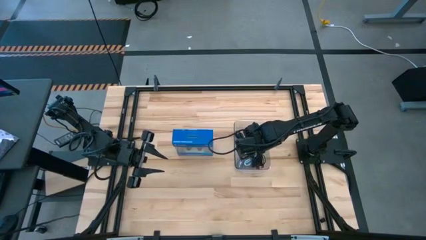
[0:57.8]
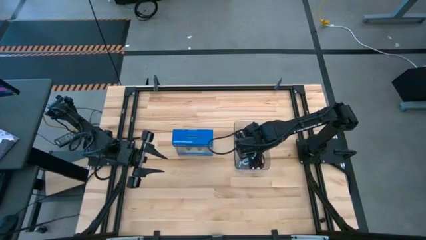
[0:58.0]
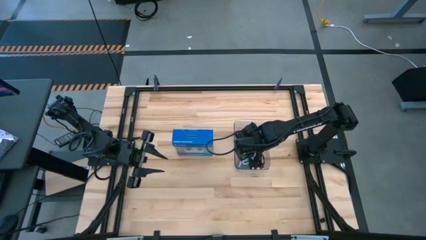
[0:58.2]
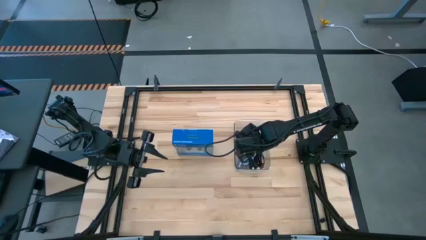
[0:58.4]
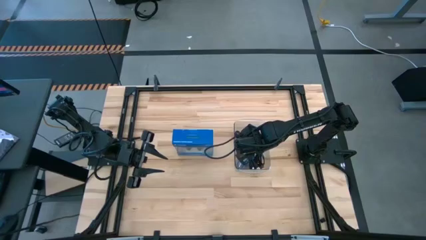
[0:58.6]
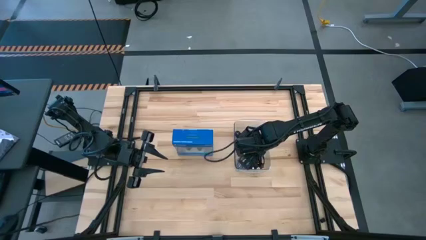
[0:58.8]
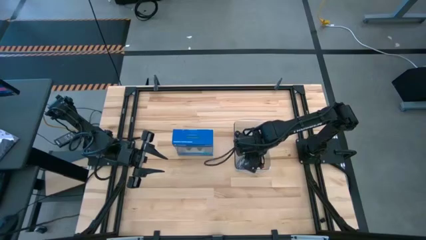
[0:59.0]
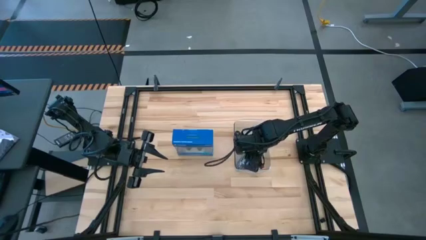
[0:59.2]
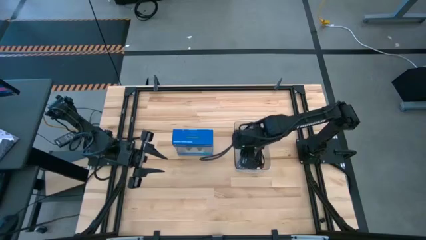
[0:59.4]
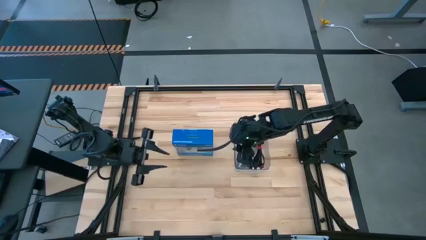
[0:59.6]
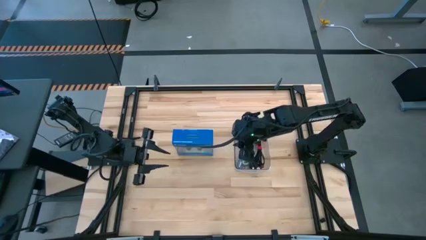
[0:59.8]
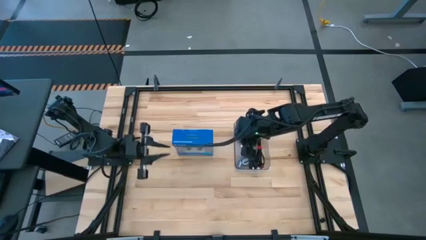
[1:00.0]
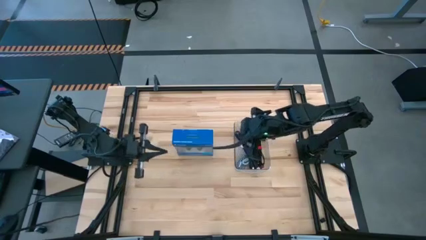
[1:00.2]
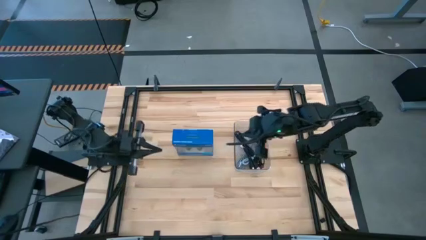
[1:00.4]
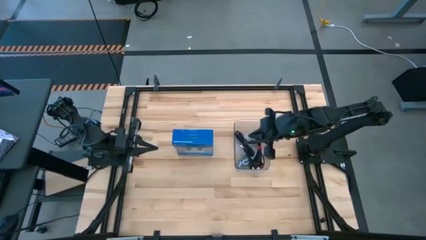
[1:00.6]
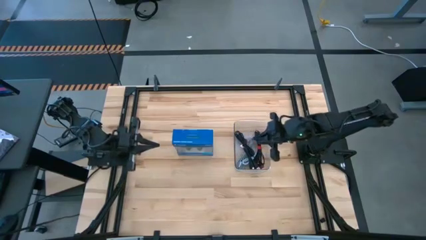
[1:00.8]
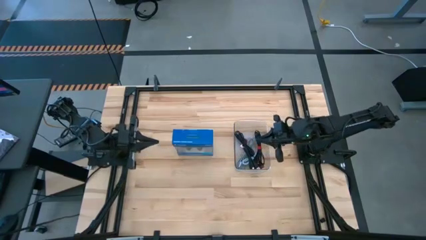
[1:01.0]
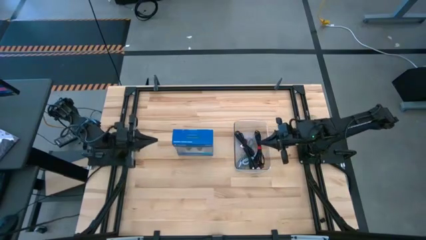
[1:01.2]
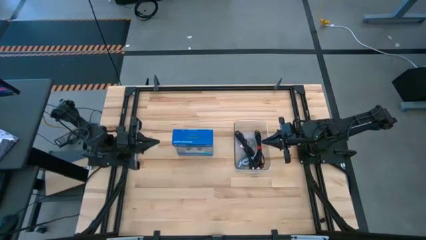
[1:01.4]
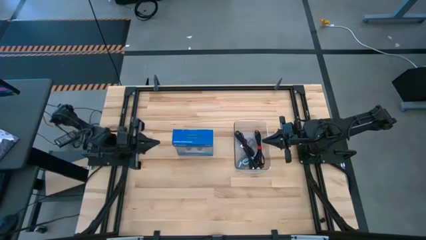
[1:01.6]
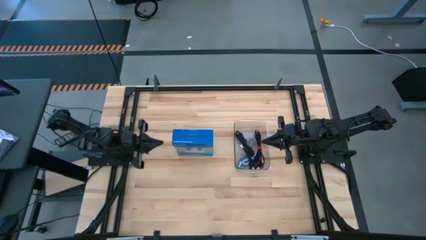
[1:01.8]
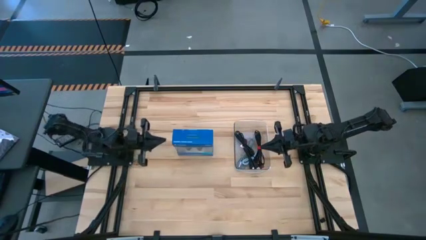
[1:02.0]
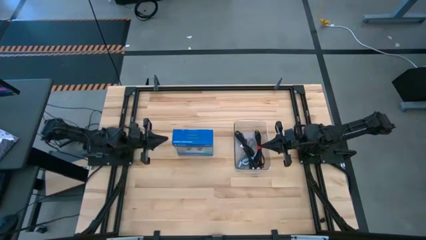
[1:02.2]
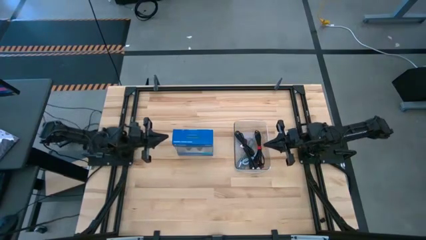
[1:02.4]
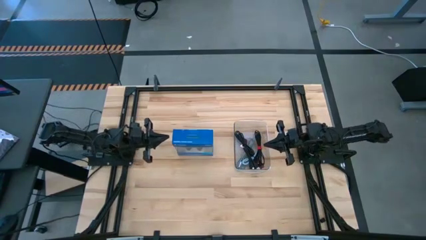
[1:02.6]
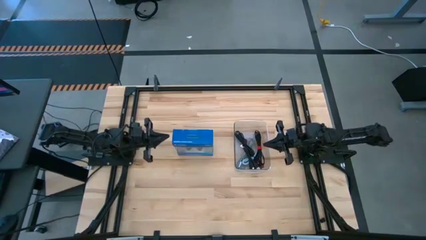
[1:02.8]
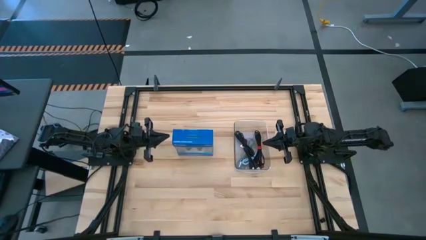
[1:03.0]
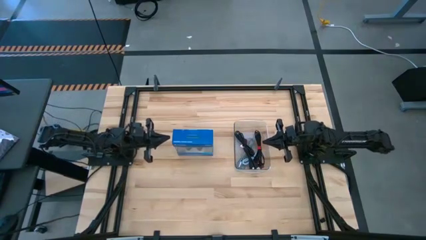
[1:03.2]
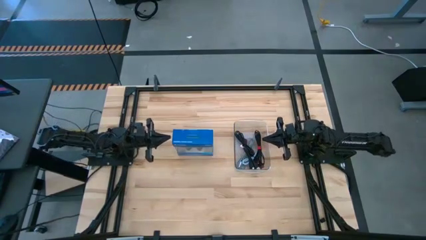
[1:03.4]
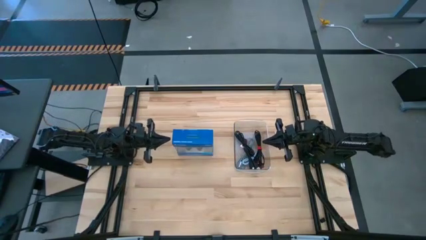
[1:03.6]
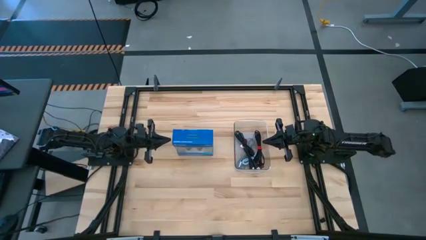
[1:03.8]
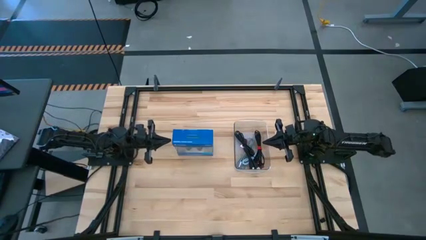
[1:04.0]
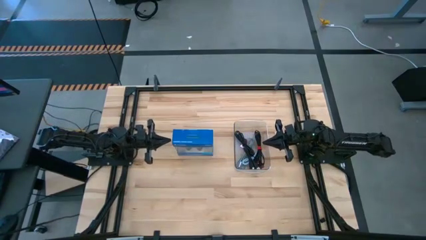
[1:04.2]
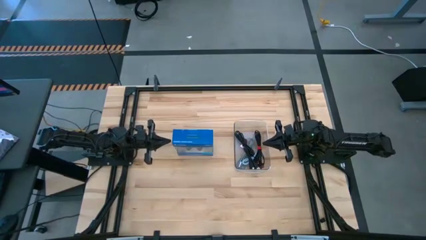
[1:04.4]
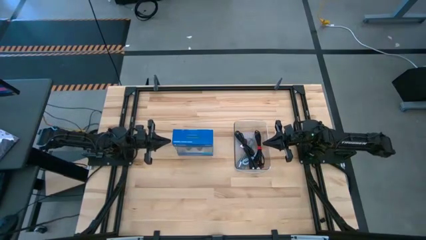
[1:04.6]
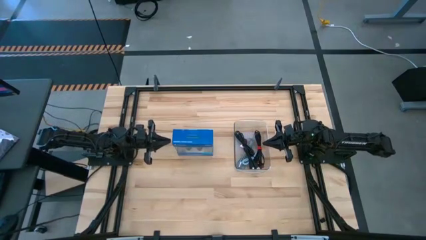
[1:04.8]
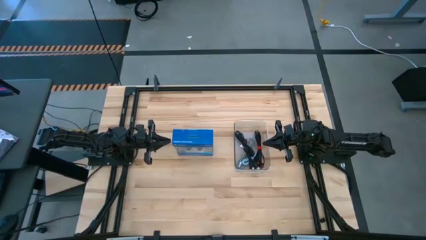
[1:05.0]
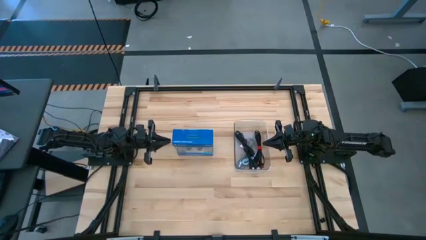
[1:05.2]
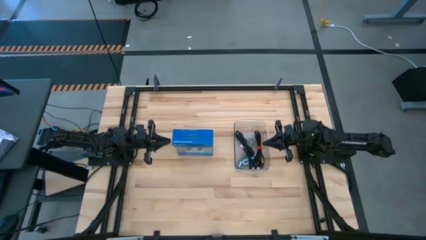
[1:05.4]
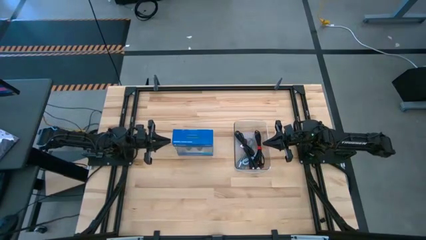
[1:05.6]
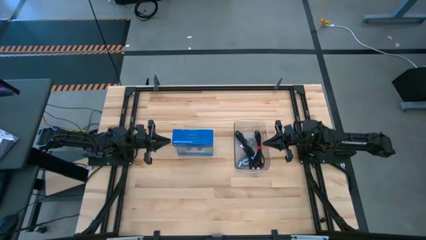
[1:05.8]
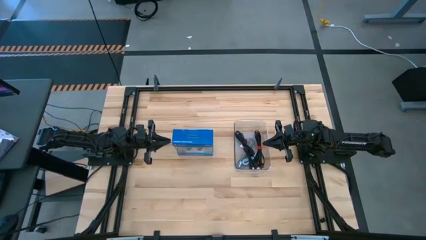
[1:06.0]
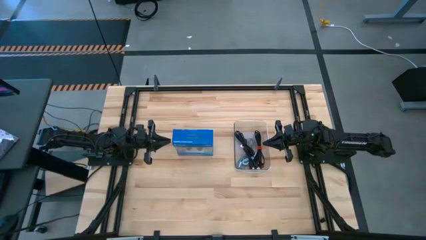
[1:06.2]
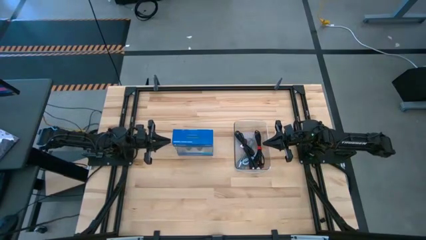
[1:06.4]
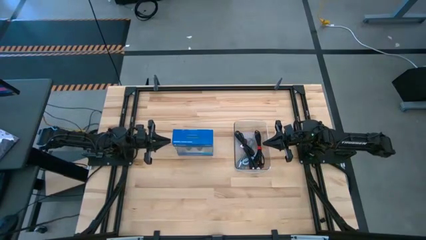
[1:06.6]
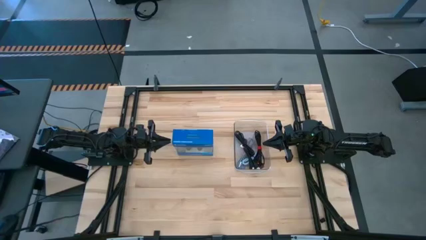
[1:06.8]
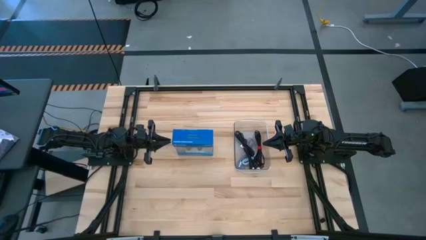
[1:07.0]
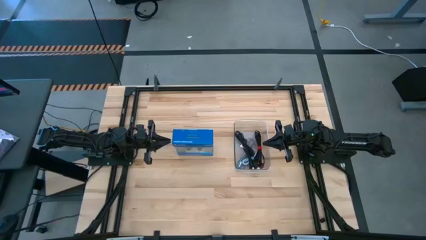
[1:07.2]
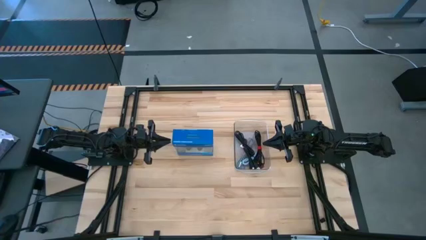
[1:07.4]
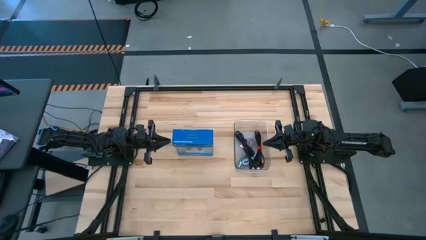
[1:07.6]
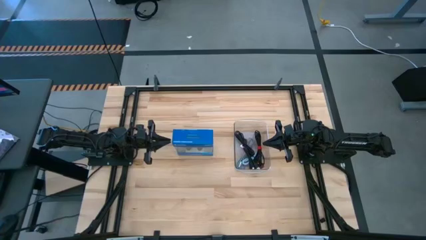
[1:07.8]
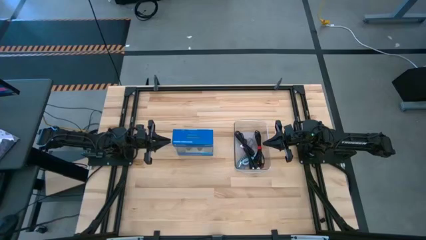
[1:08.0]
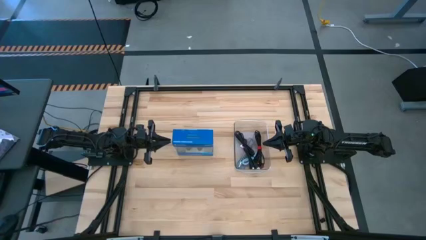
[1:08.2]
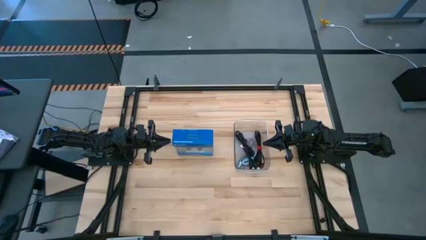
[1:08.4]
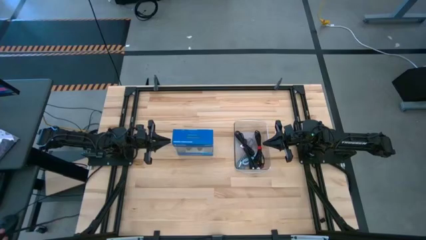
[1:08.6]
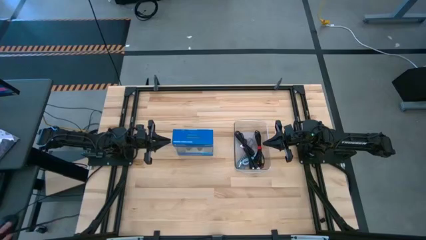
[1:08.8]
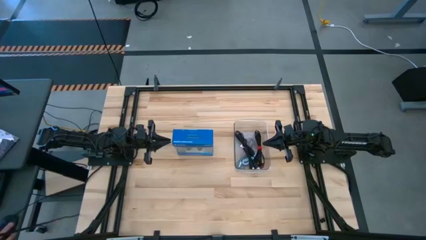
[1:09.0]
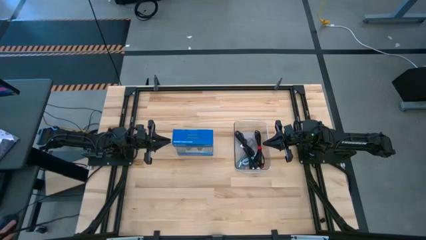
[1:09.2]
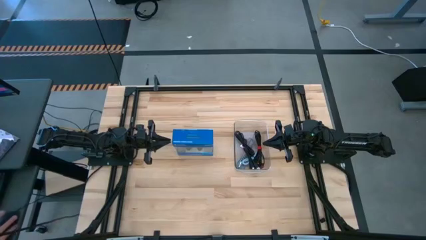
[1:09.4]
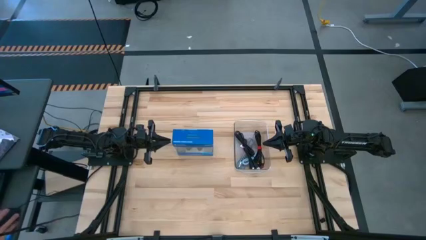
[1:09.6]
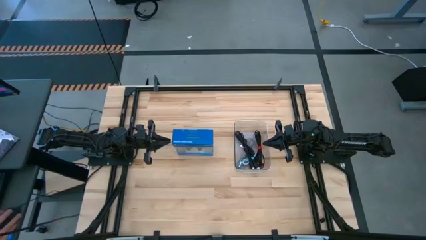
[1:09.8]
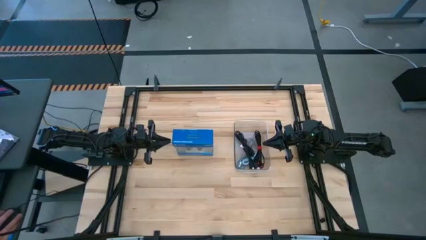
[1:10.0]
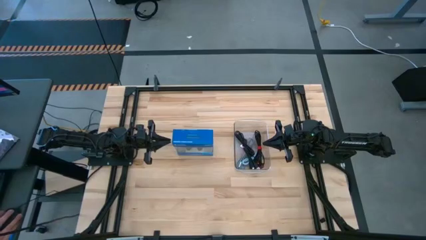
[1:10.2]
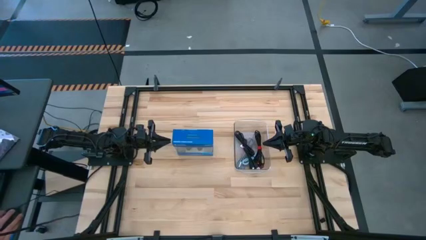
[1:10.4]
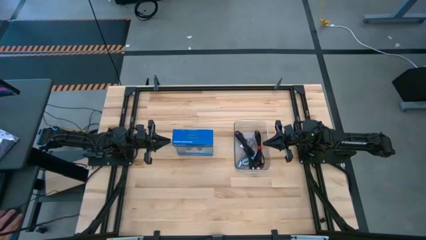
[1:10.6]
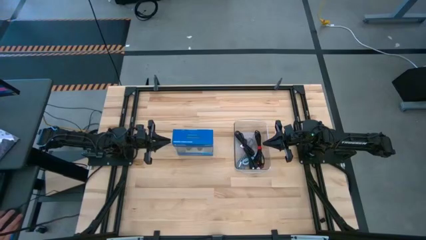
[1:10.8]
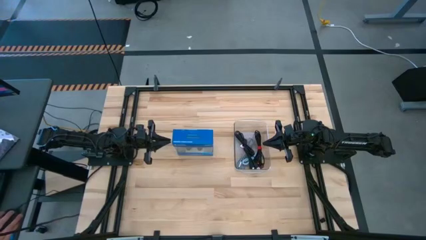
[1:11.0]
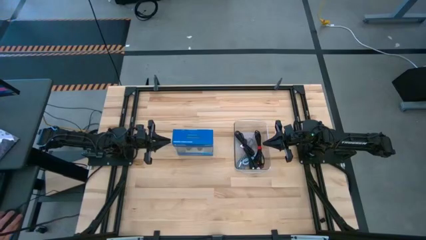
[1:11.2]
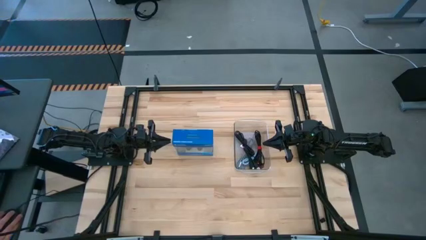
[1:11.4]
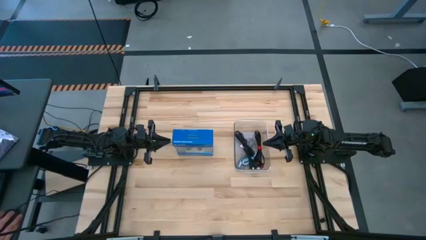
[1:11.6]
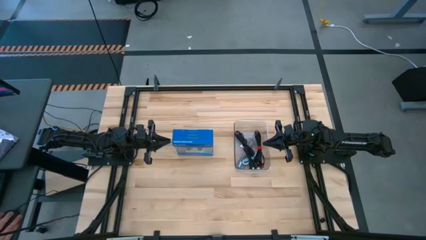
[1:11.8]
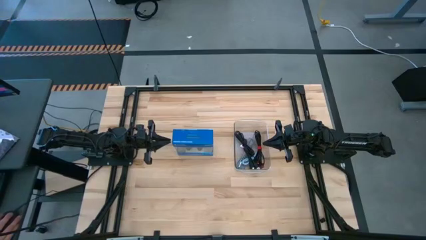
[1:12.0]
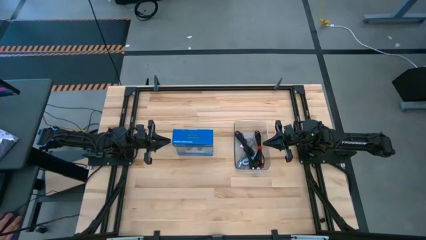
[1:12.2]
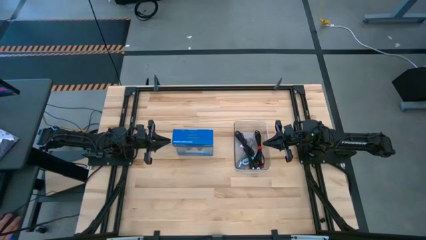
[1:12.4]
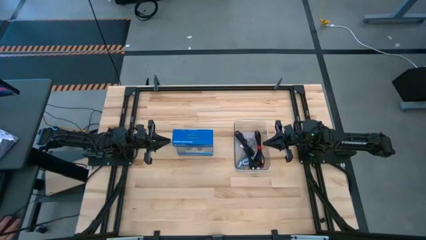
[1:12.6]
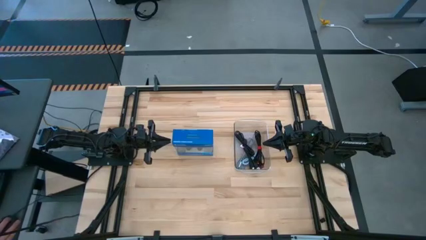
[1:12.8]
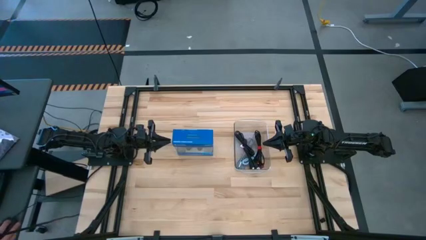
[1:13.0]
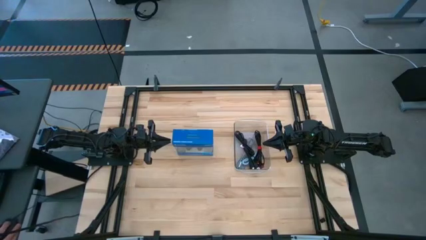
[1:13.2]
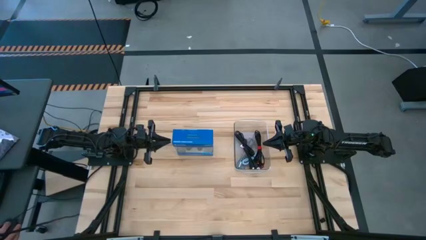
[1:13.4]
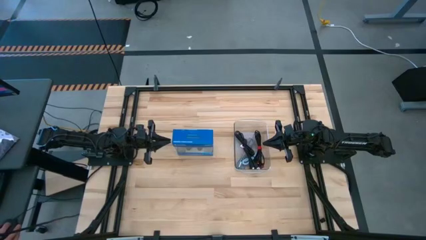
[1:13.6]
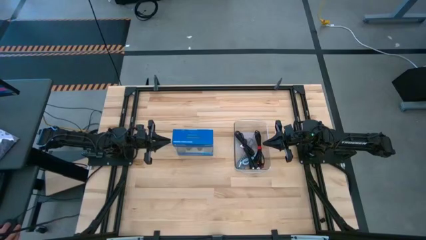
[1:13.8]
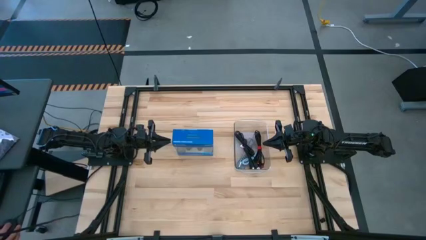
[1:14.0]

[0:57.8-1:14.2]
Task: Pick and place USB-C Cables
Return to Home Position

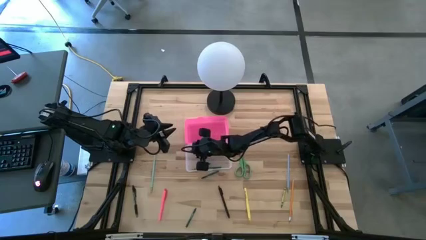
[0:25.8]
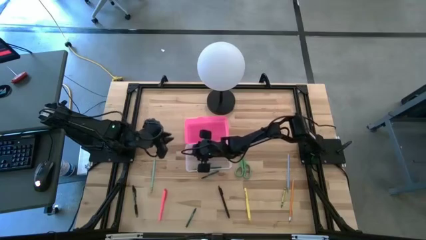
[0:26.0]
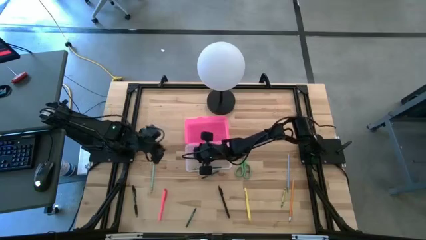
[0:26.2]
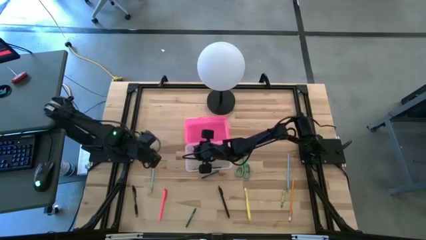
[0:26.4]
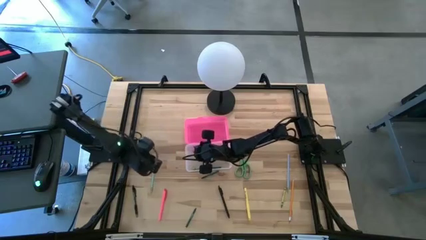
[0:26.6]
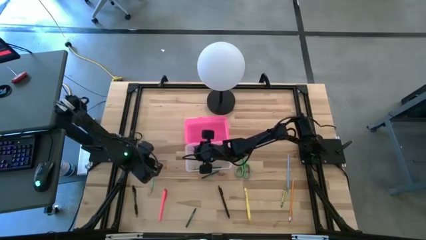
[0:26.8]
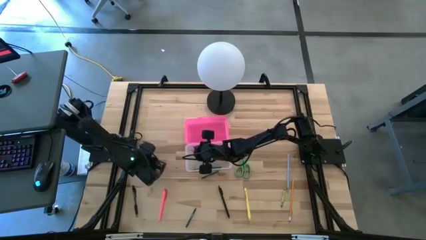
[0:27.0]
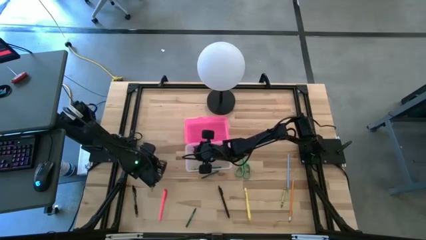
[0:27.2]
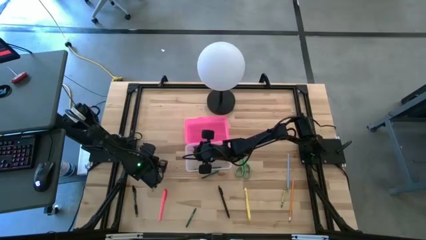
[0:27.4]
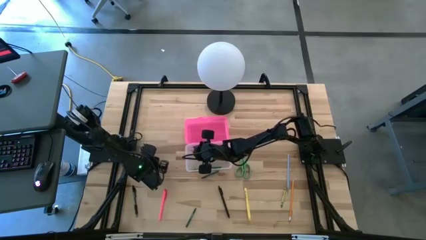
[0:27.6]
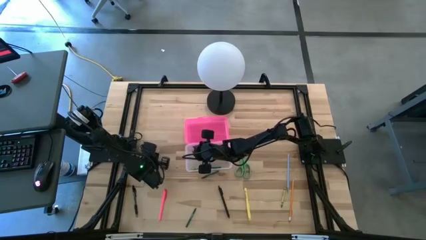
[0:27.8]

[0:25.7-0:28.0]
Task: Pick & place school supplies into a supply box
Put the left light blue pencil into the pink supply box
